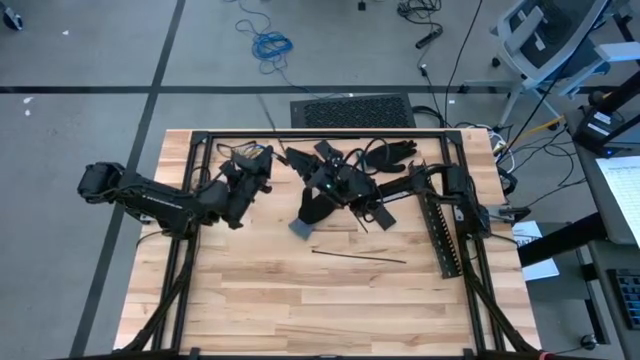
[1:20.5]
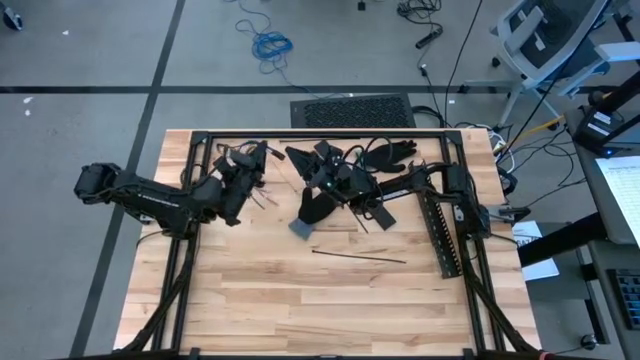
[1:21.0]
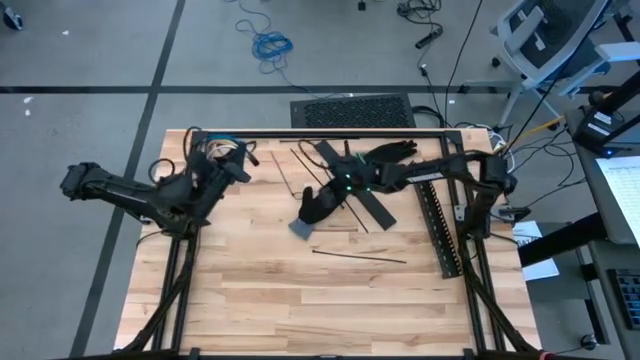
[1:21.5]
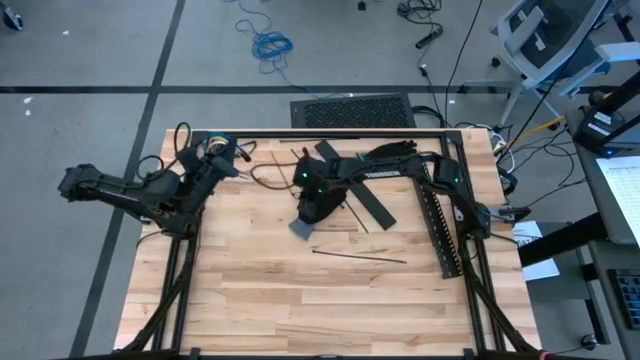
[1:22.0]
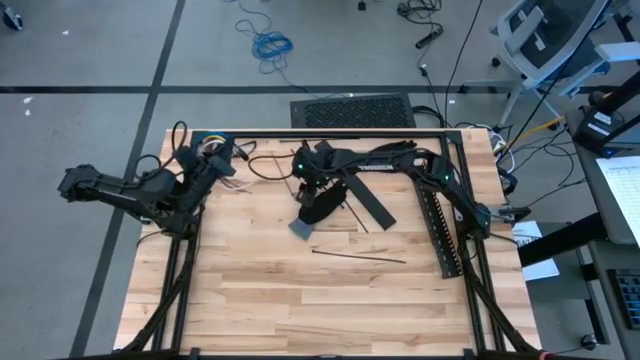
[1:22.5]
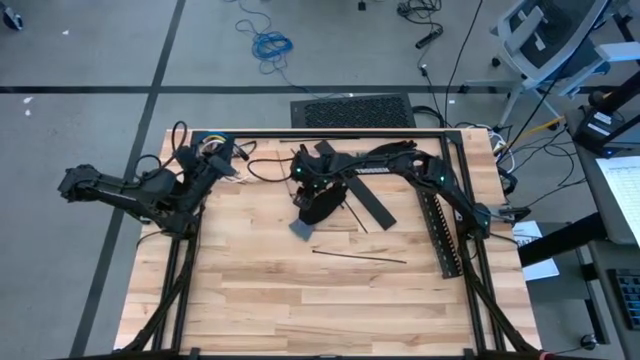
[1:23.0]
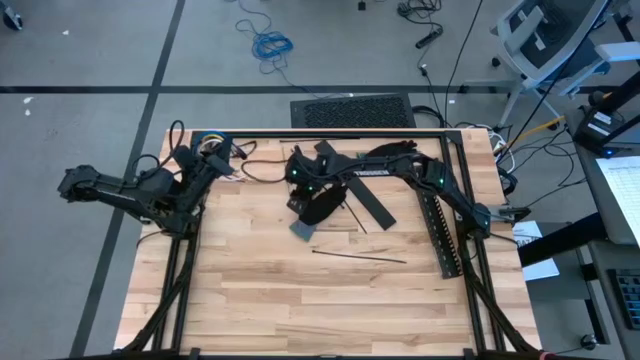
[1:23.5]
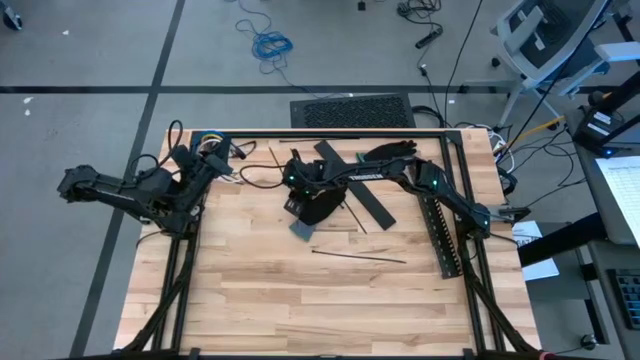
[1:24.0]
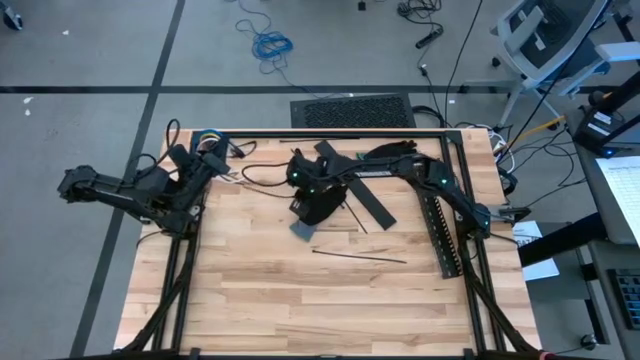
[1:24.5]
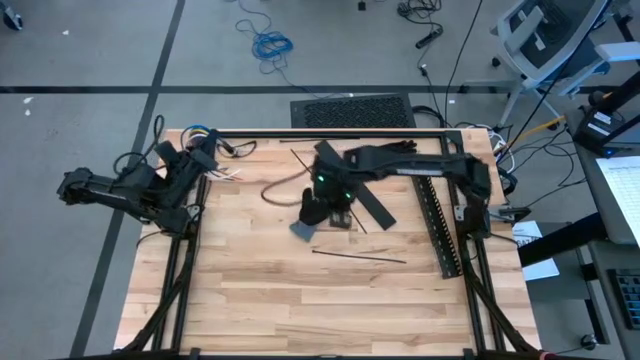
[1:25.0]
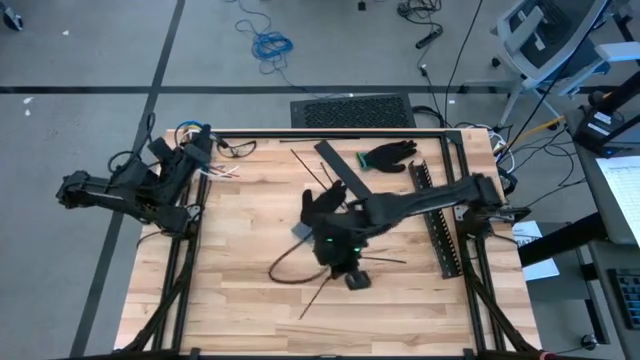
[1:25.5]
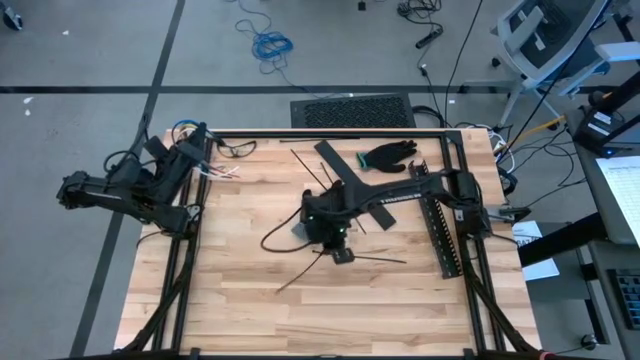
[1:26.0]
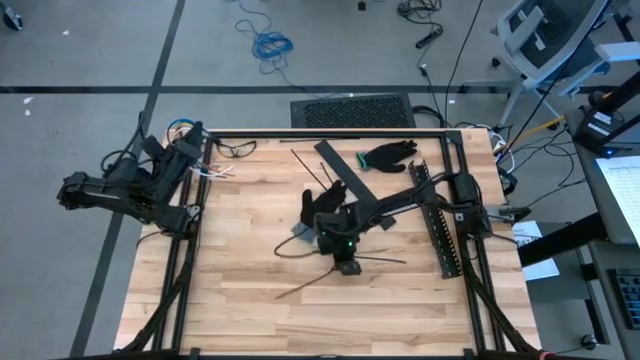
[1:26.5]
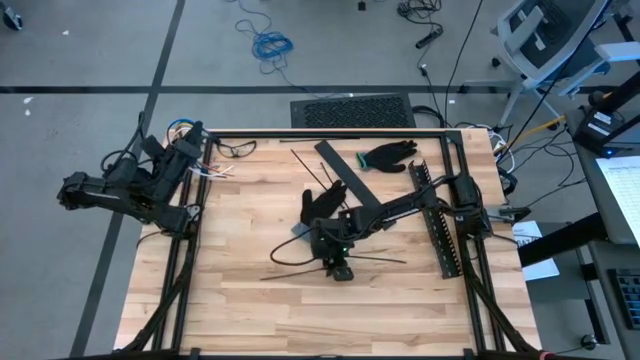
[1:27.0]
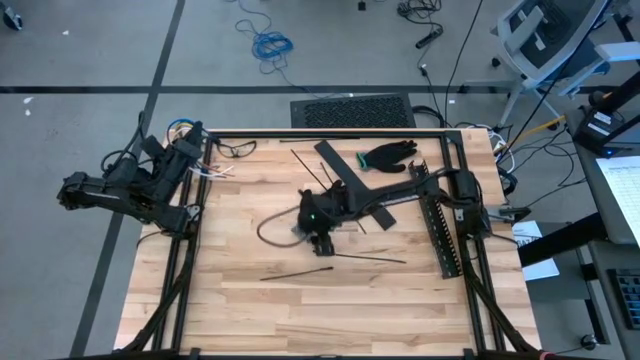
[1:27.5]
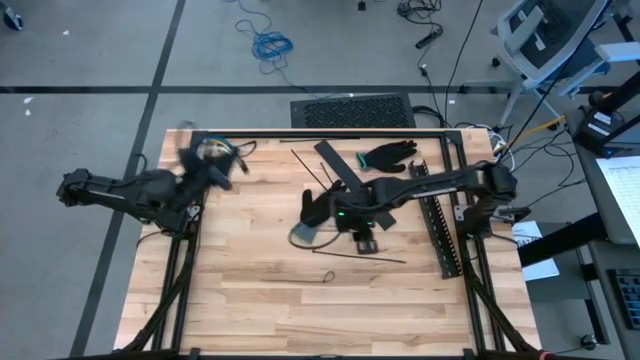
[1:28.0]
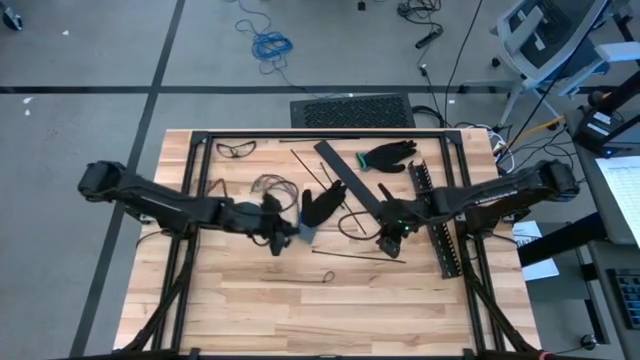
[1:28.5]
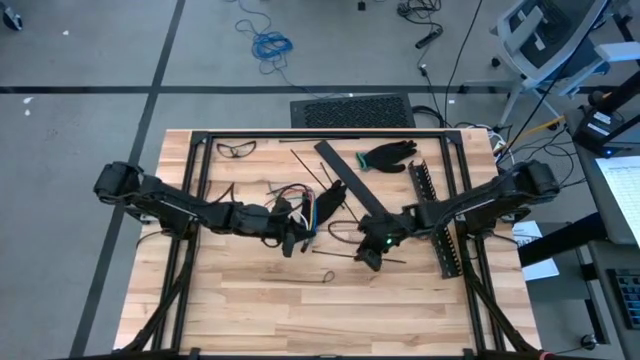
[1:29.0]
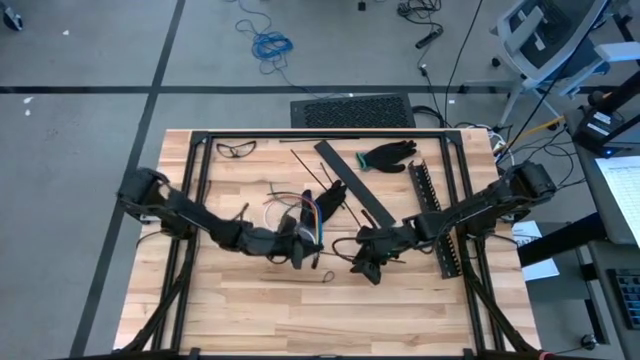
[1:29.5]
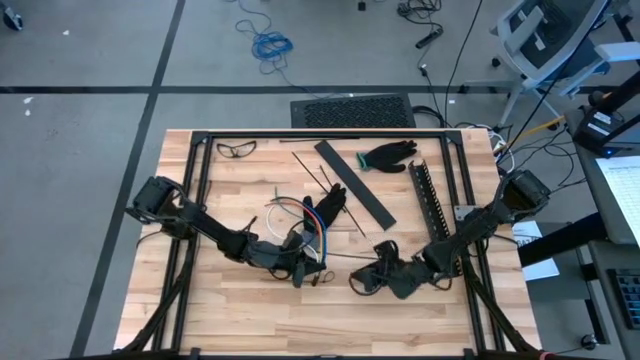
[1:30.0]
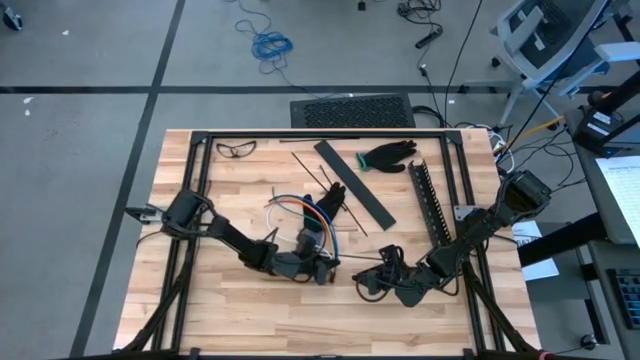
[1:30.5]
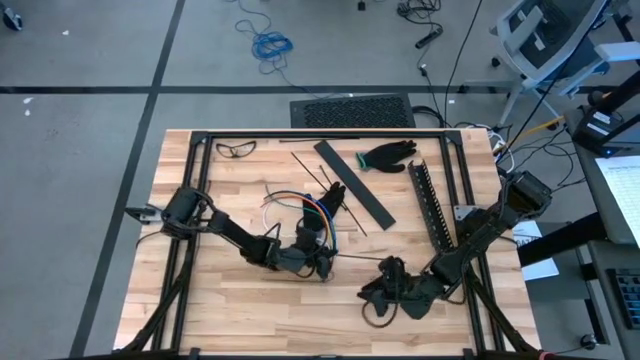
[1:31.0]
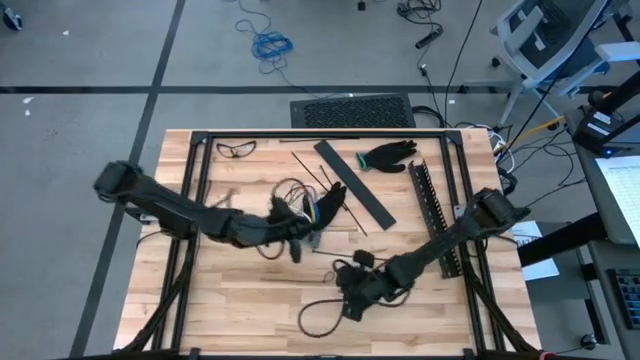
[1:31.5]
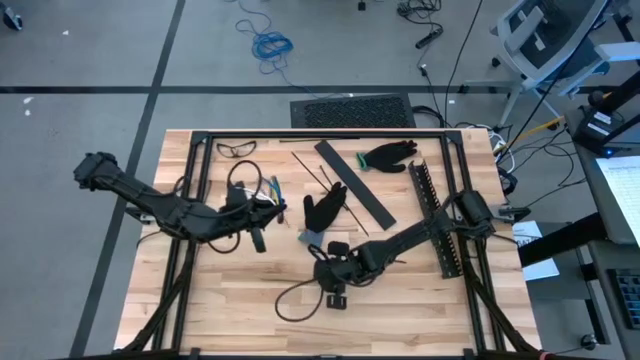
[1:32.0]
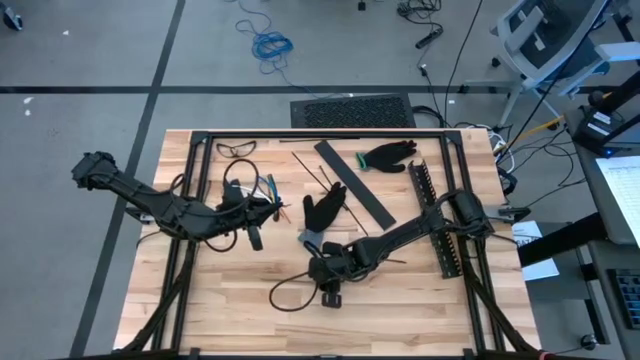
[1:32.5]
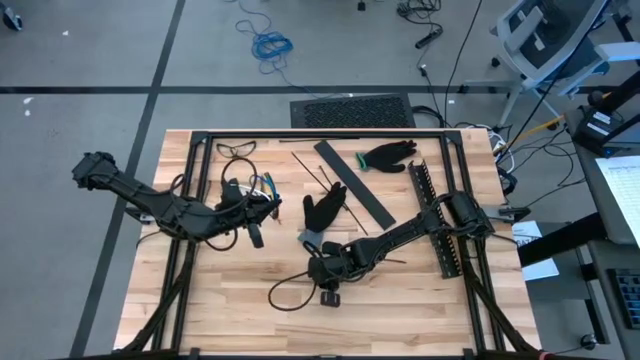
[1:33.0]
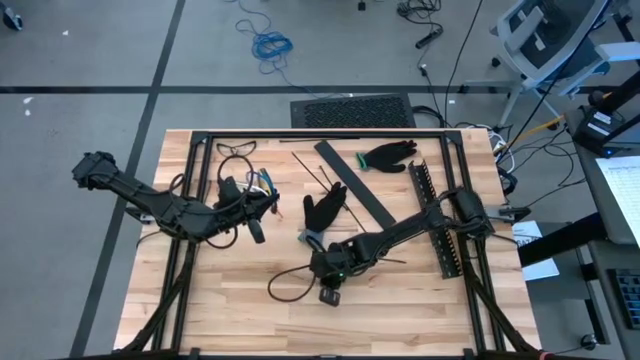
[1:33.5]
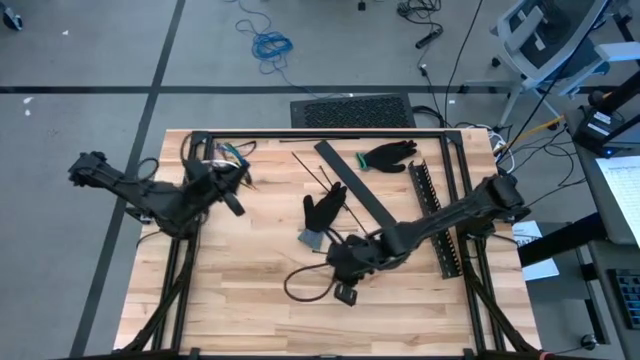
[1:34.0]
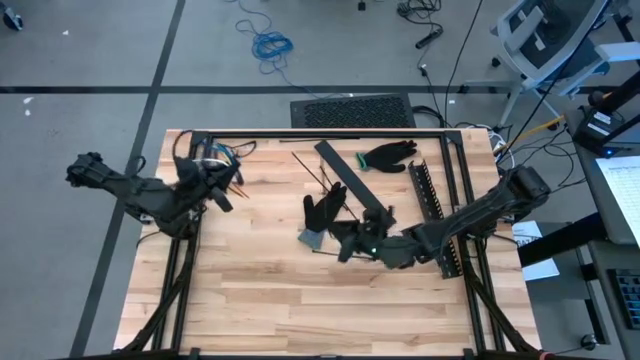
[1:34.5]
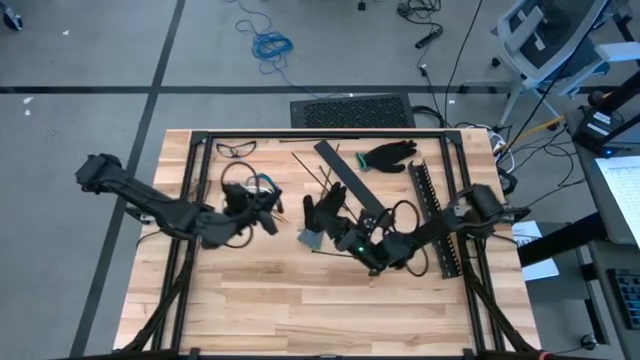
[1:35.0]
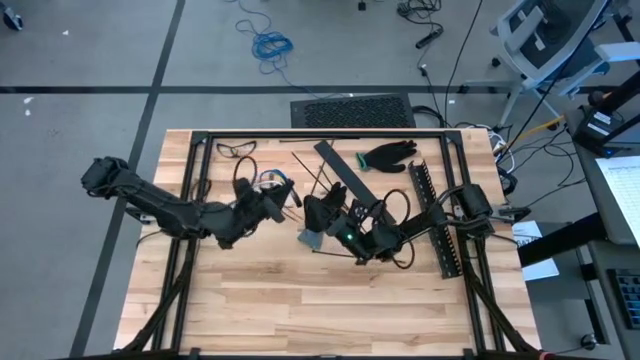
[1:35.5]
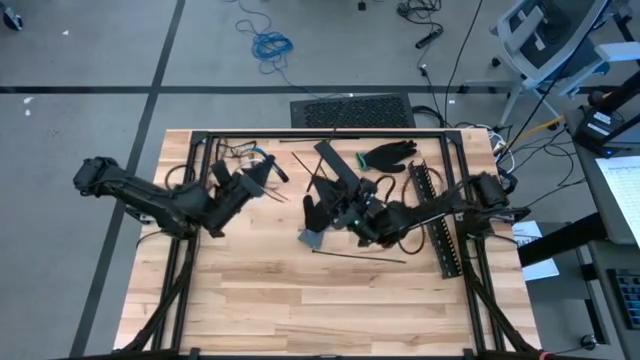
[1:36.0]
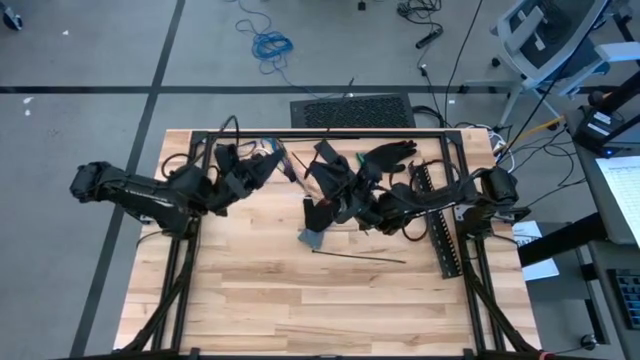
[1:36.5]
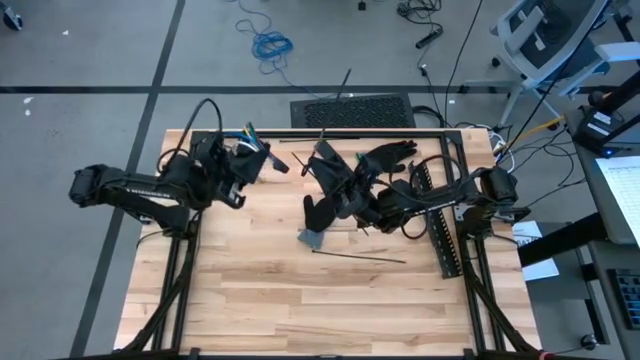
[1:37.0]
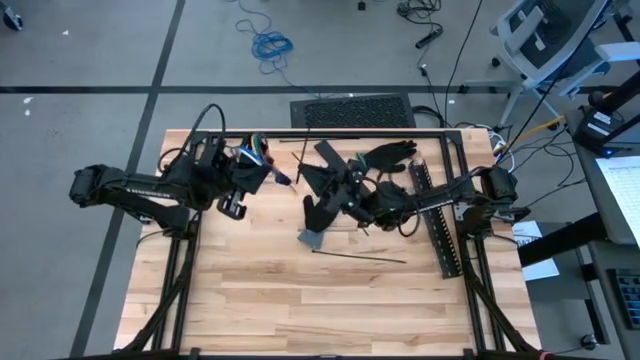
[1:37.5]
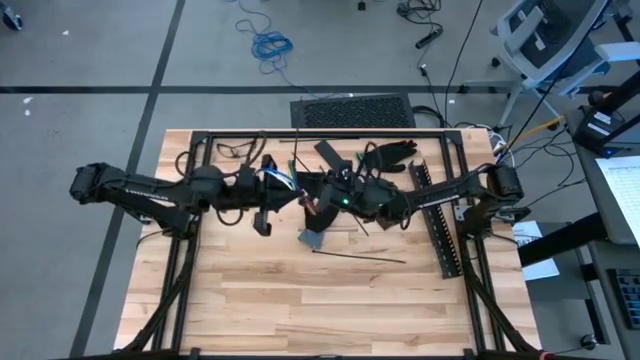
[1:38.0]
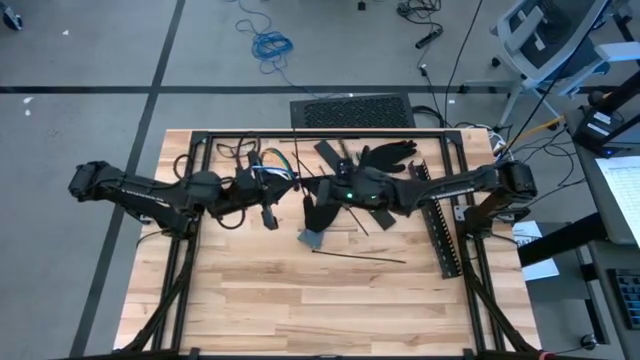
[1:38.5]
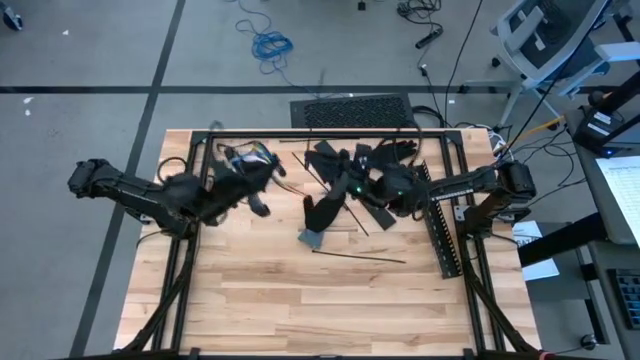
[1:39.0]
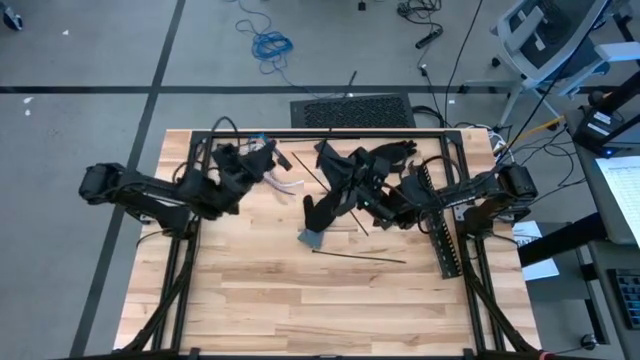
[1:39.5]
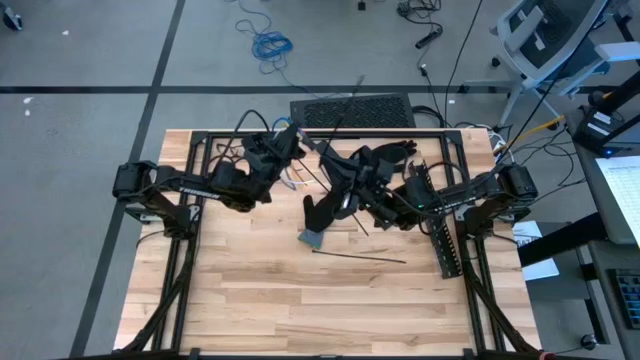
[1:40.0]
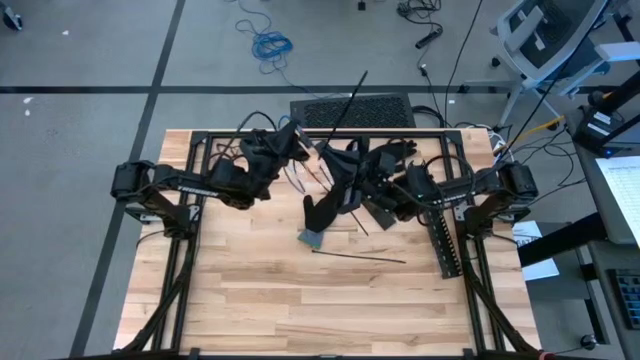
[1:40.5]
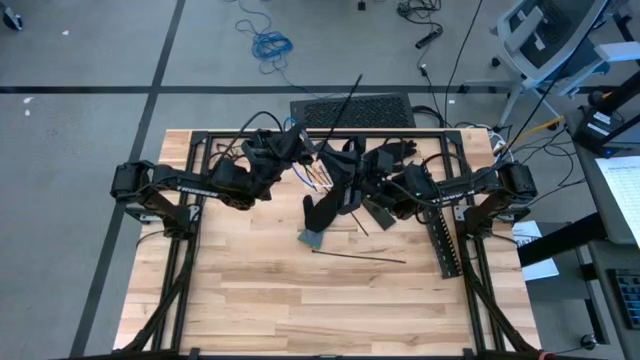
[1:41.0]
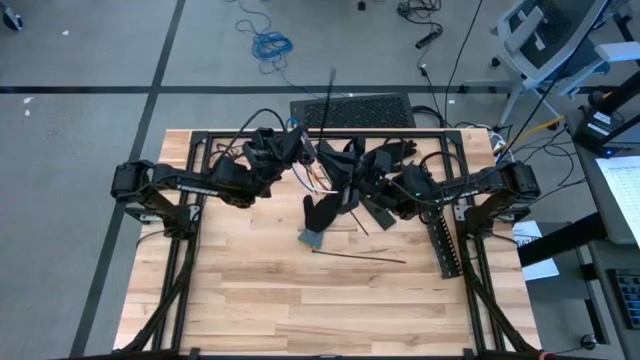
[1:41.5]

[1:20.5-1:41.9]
Task: Ziptie cables
Wrap the black zip tie on the cable

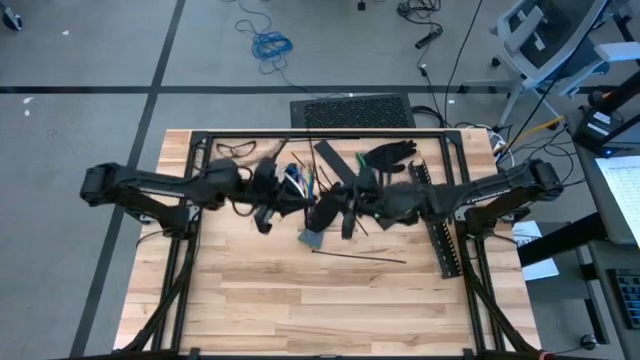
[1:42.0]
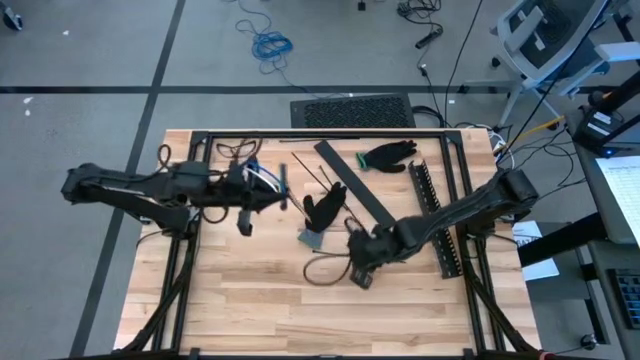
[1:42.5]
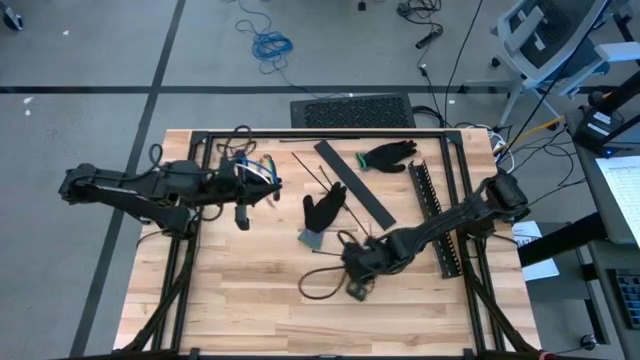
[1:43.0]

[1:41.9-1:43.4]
Wrap the black zip tie on the cable
